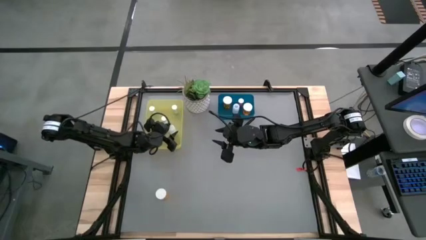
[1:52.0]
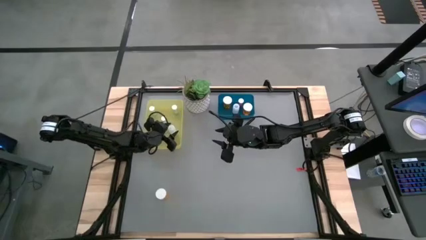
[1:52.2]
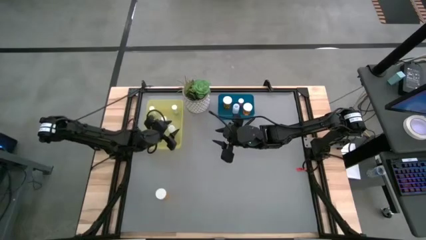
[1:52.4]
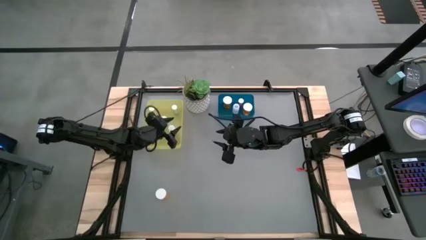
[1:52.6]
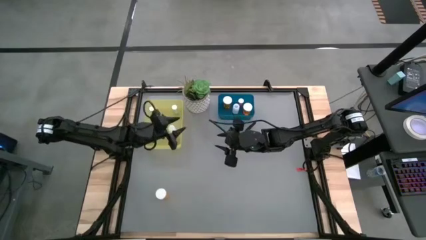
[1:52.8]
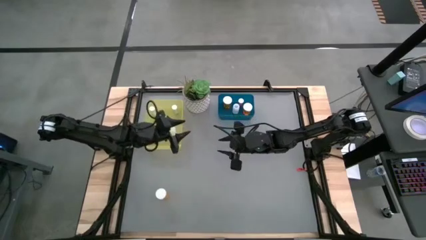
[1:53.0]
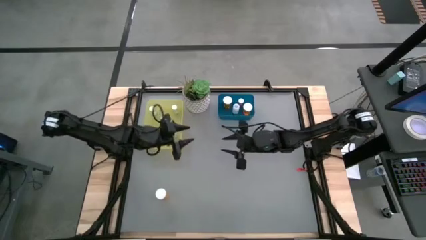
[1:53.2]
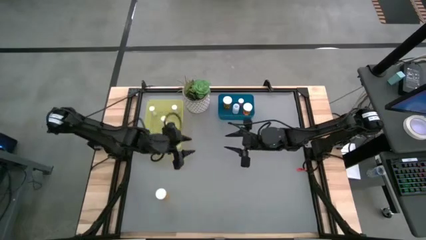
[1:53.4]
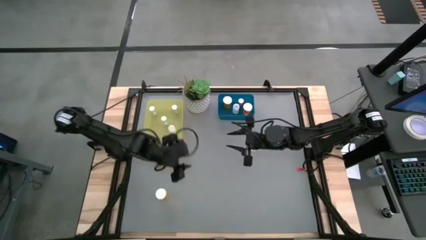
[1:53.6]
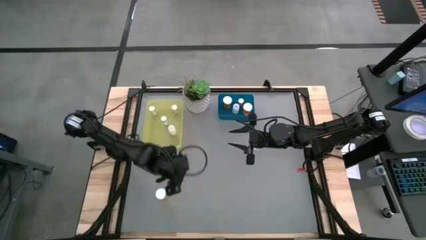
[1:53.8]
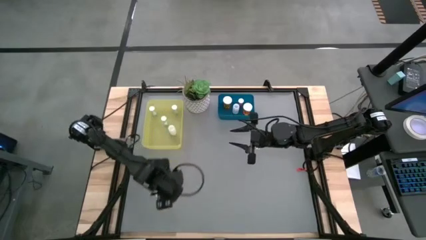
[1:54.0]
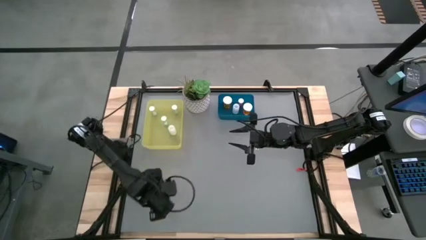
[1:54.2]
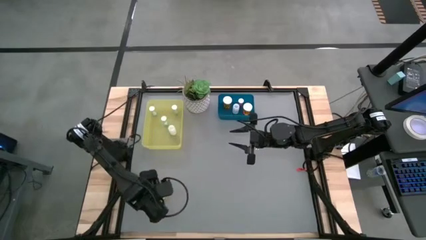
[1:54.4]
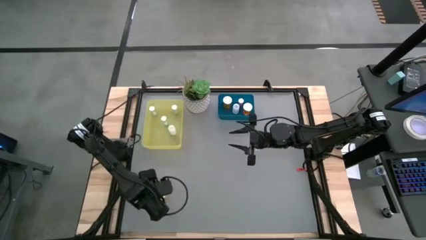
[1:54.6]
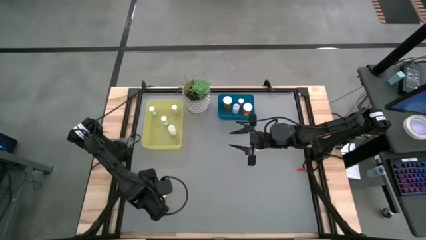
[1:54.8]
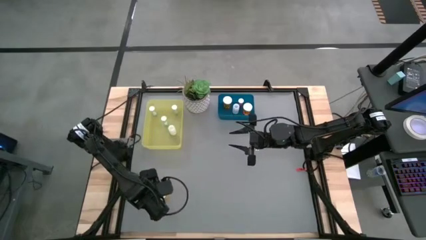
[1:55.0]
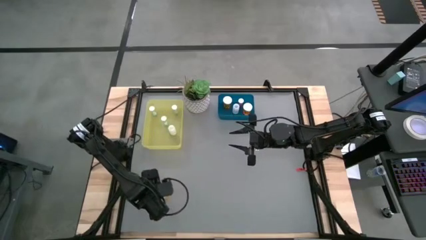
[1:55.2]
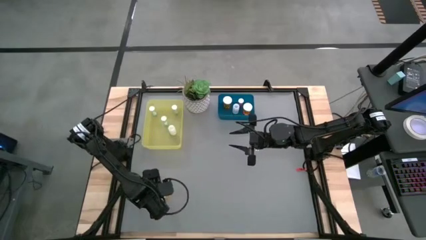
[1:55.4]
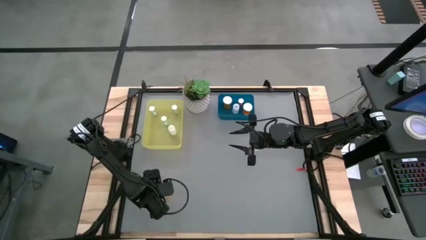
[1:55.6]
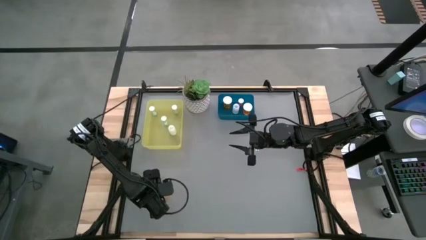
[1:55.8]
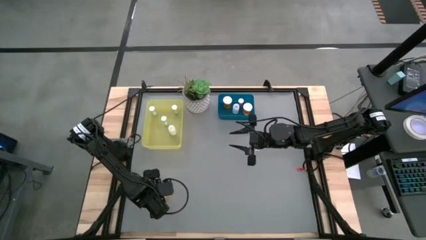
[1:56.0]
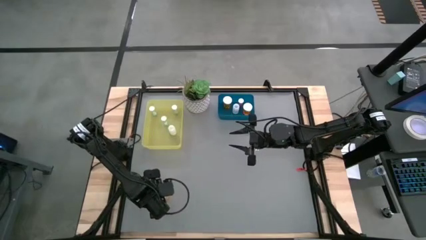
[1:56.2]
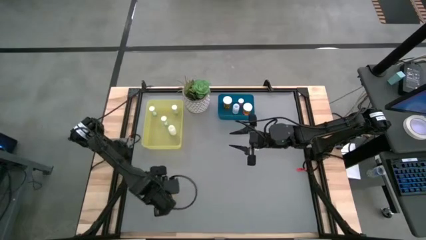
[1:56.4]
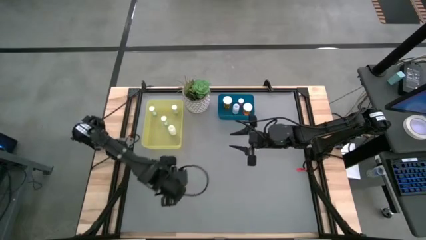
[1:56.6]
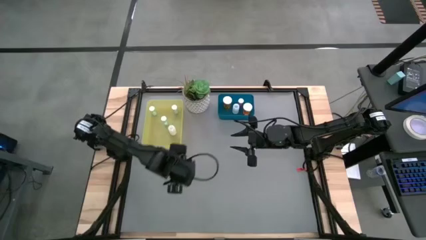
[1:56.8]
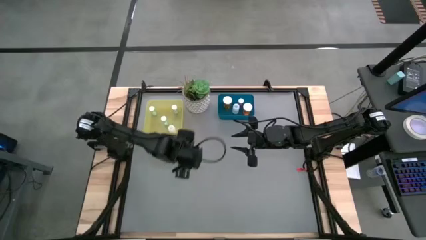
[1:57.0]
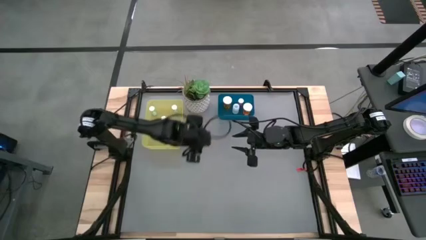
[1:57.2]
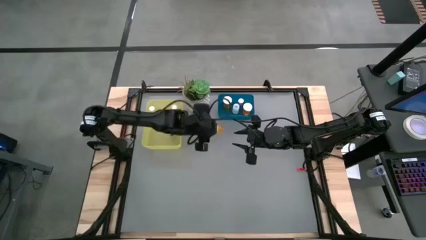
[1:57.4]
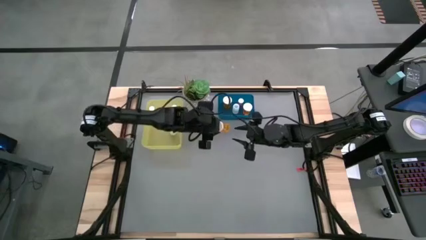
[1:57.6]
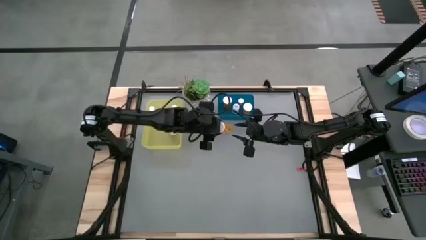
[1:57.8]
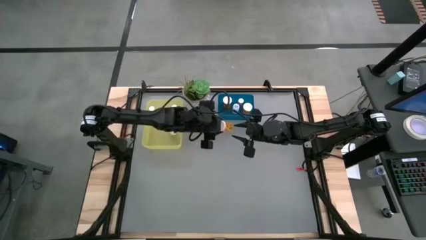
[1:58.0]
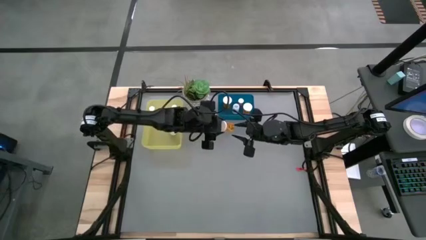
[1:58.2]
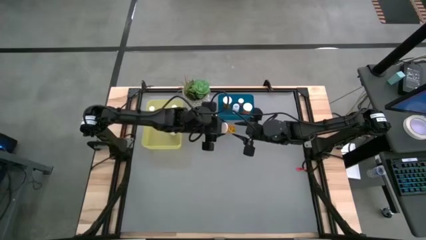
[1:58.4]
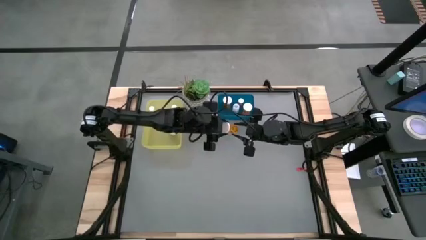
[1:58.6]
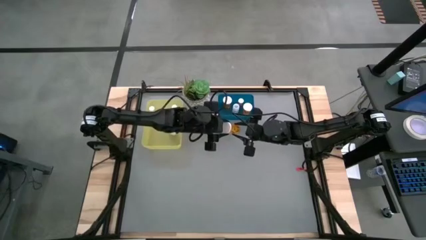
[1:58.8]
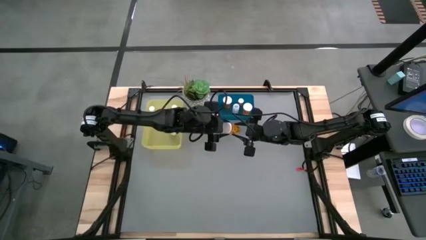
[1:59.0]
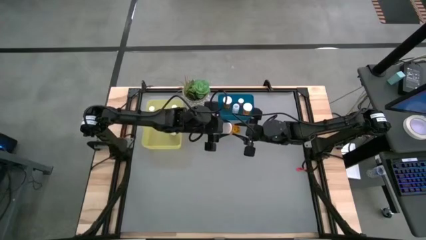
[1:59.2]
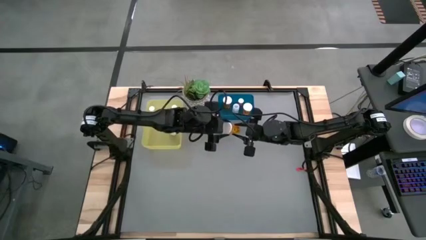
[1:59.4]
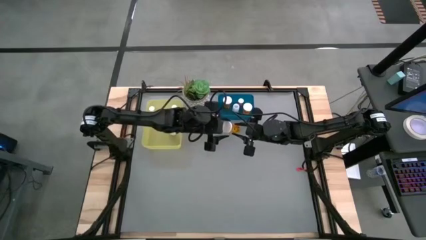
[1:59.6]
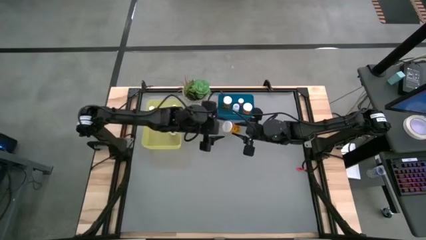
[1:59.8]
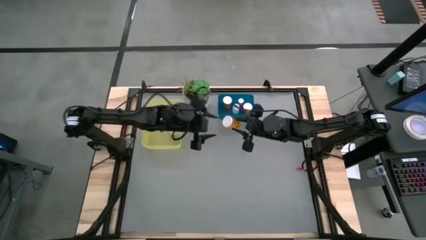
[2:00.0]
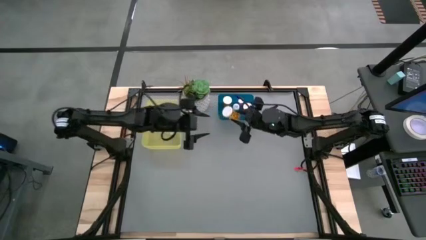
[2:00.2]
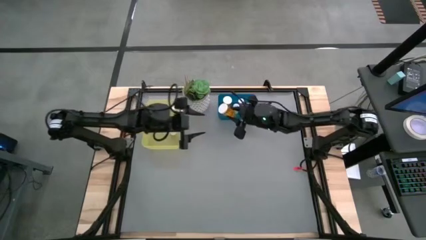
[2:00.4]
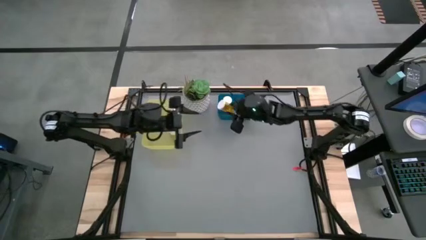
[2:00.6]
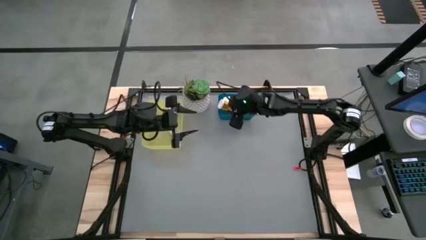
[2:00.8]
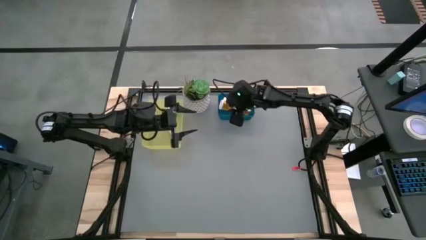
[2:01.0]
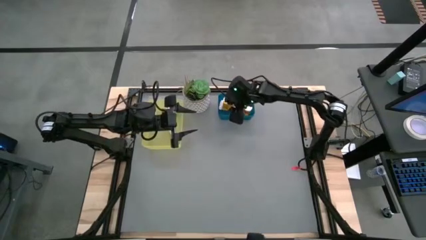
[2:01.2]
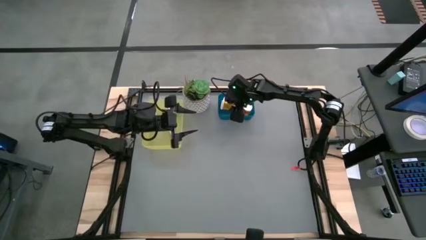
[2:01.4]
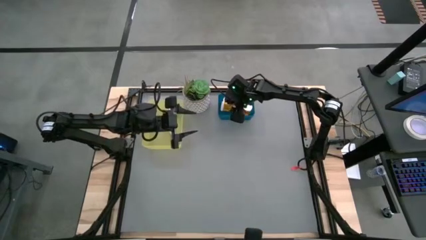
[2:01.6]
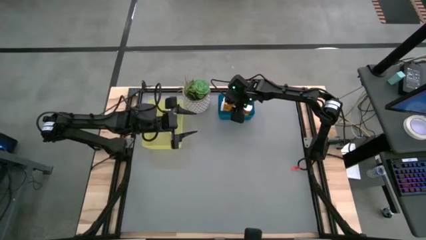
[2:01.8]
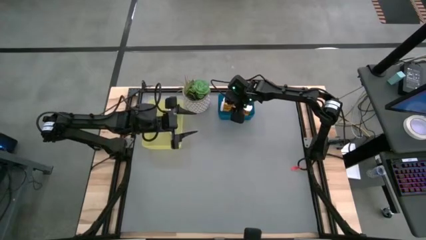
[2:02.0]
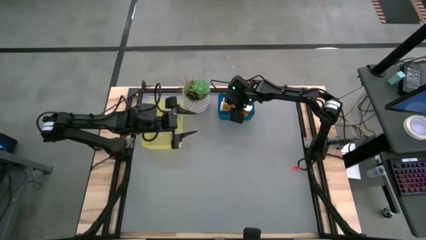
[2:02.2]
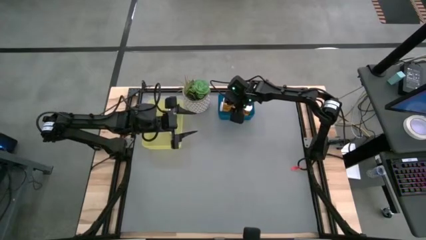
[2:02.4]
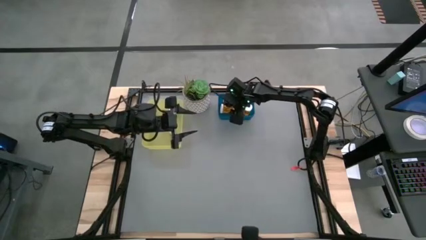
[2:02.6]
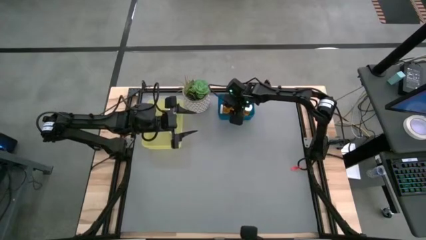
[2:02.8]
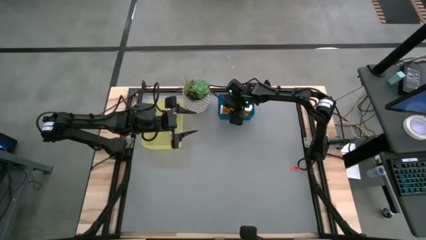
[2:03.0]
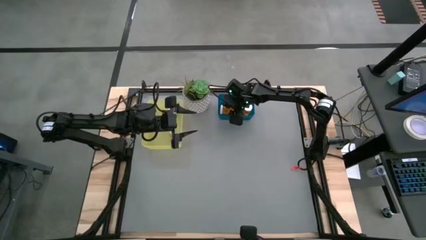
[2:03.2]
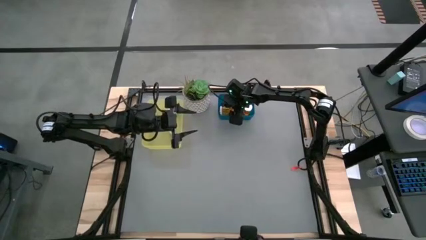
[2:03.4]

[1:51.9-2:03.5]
Task: Pick and place medicine bottles into bin by pill shape (circle, oval)
Put the orange capsule bottle into the blue bin

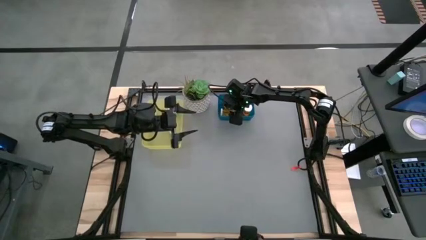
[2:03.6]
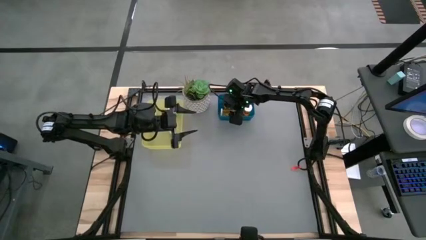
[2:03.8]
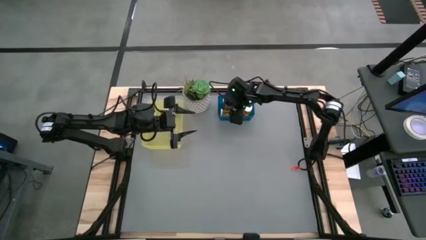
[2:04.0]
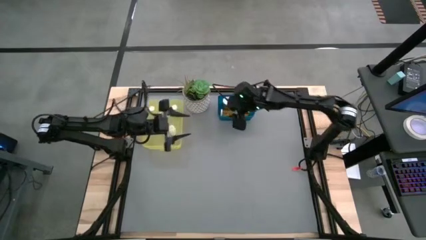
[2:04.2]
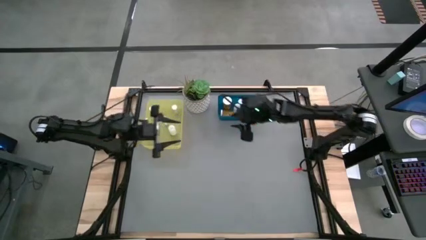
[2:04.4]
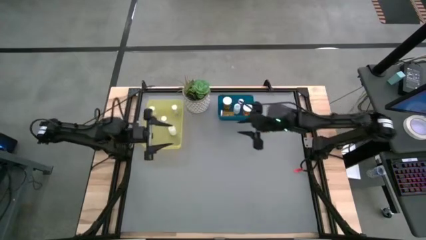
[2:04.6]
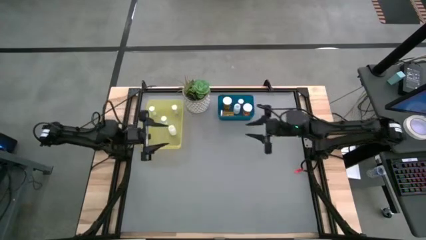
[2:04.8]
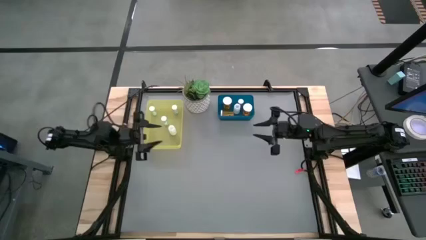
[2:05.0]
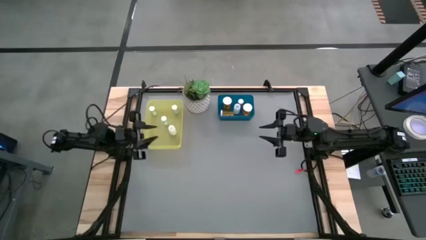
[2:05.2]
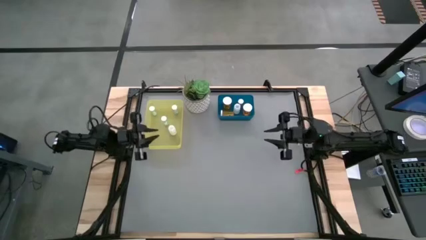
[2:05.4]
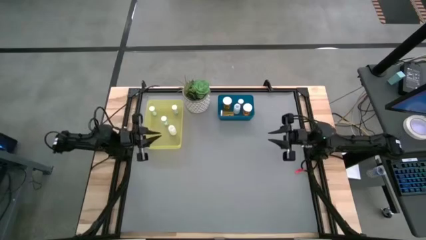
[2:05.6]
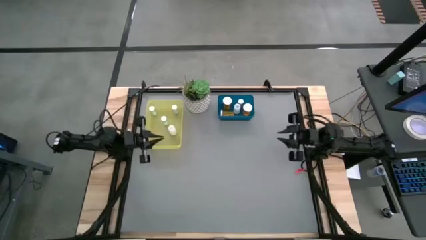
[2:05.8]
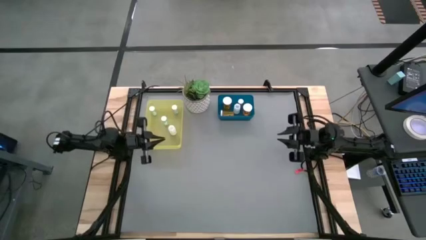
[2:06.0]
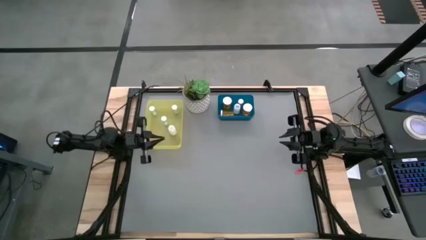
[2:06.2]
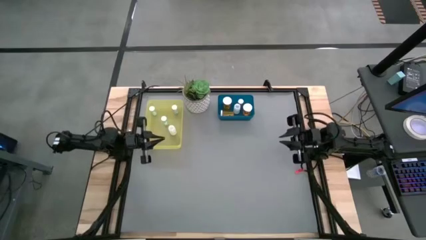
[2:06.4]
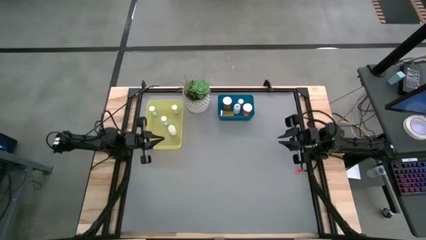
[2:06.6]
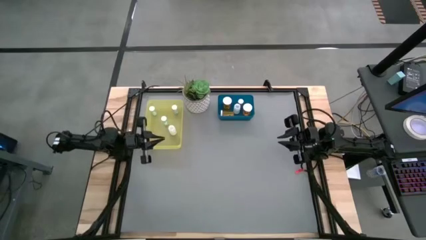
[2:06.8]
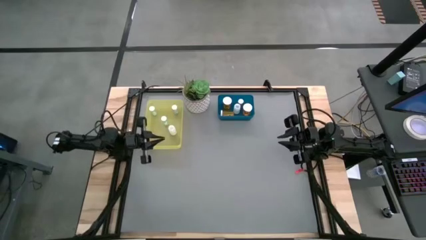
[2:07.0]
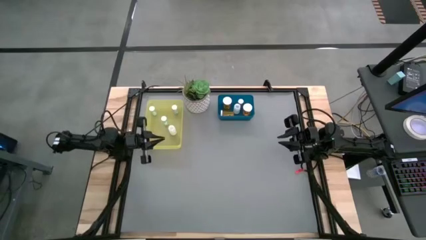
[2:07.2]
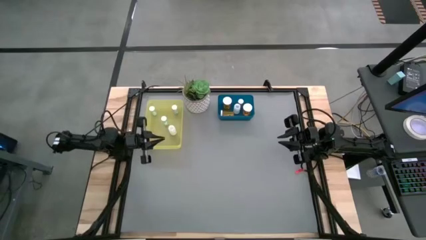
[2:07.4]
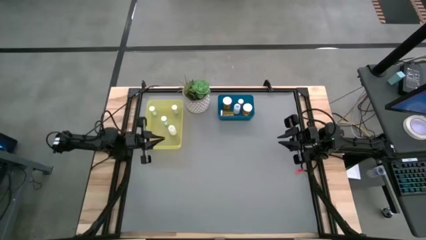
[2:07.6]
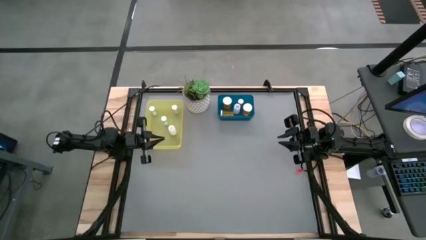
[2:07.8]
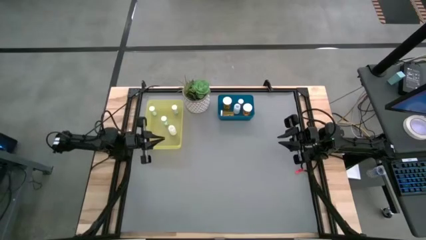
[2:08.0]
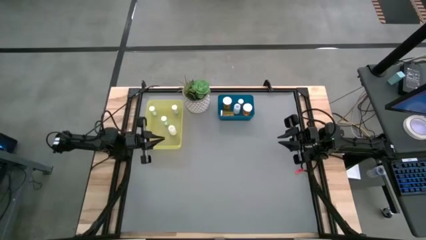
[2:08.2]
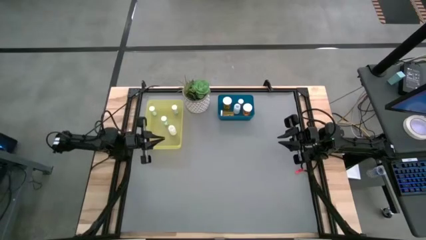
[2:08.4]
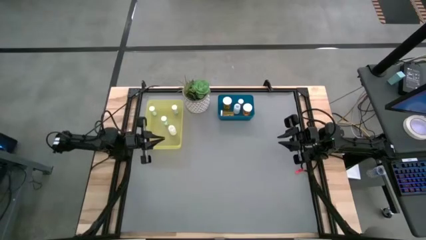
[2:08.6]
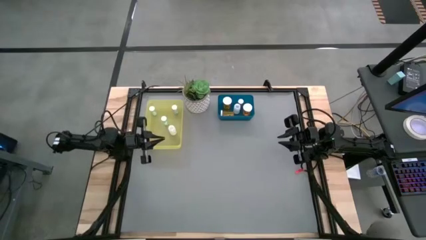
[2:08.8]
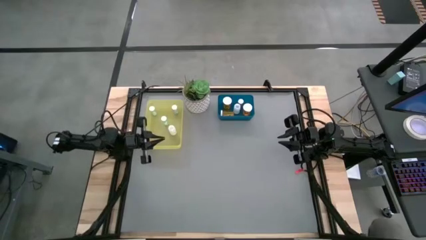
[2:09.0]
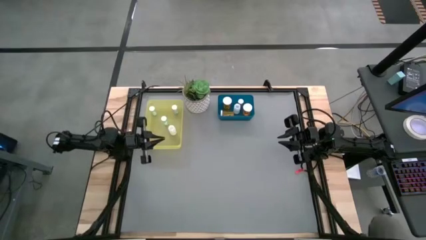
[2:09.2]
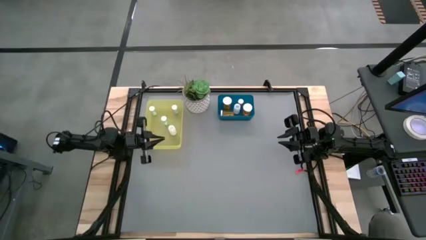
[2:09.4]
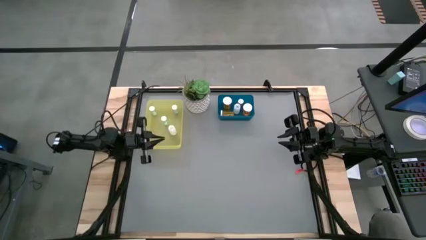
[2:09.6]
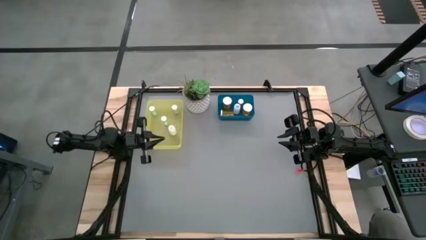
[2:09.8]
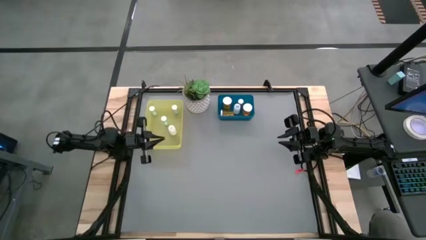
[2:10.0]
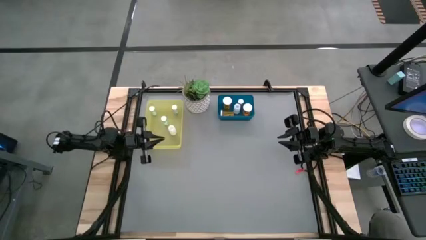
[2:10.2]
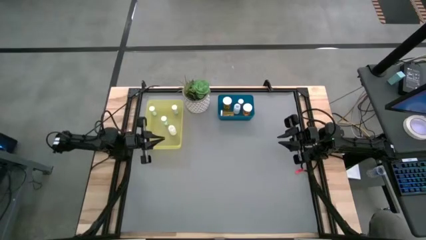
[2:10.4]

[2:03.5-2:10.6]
Return to Home Position
